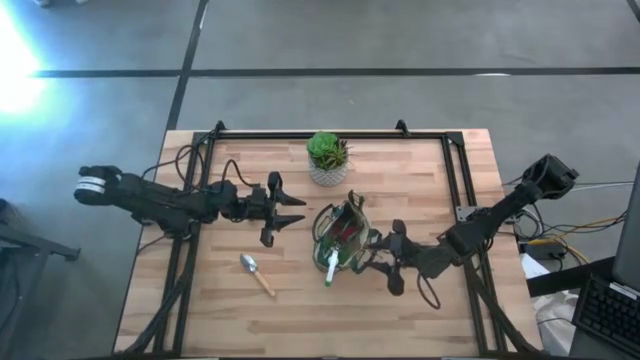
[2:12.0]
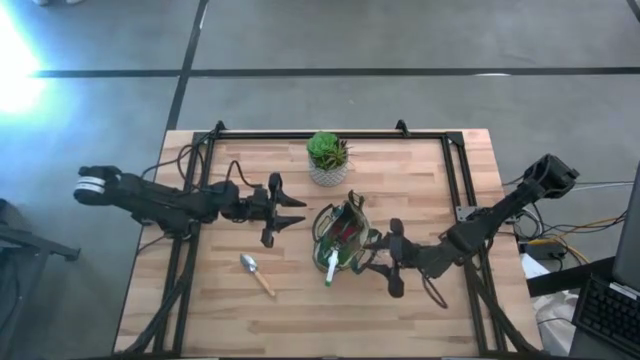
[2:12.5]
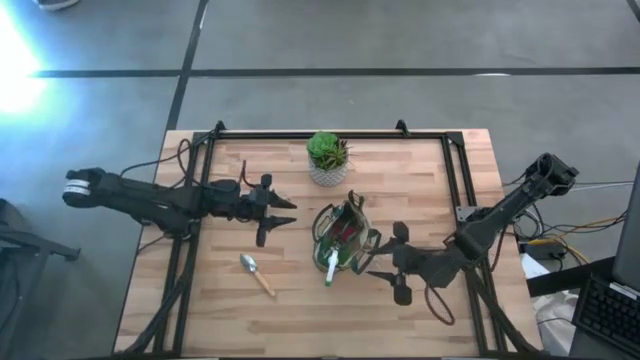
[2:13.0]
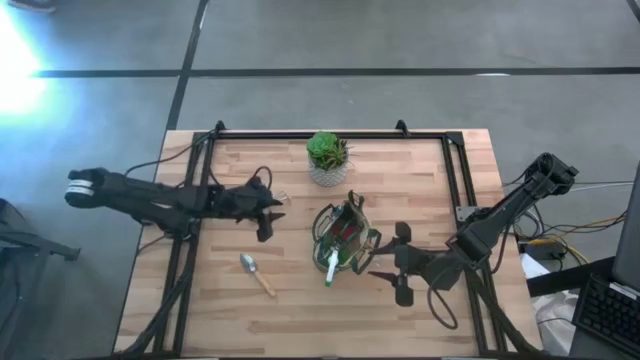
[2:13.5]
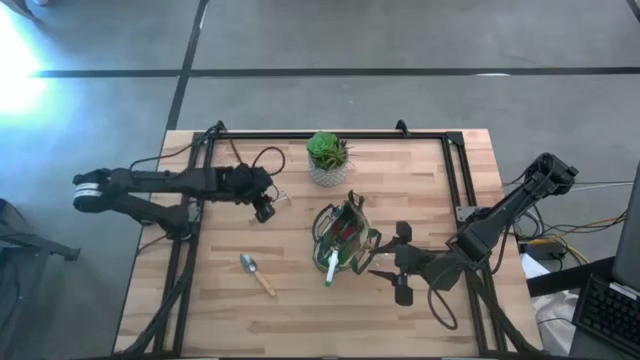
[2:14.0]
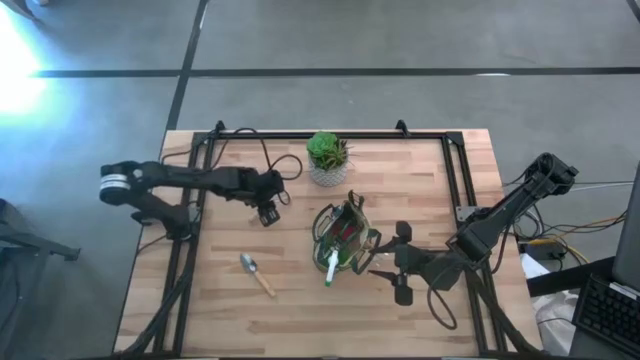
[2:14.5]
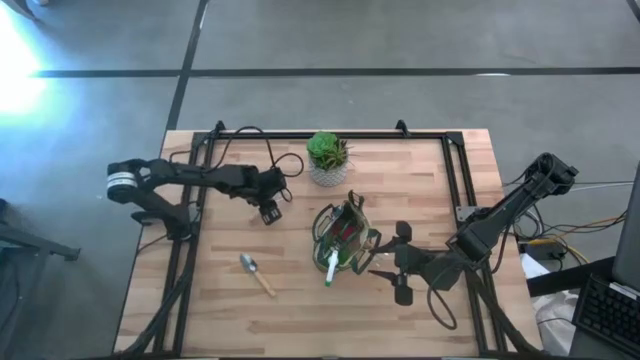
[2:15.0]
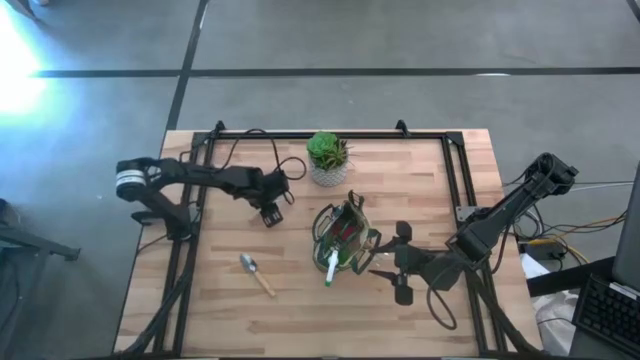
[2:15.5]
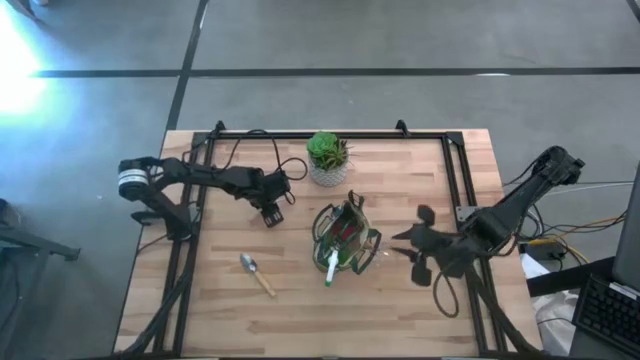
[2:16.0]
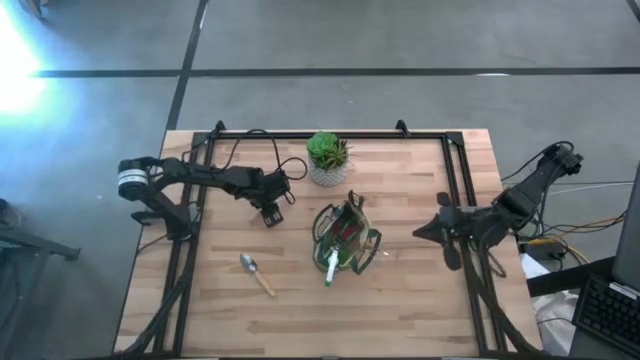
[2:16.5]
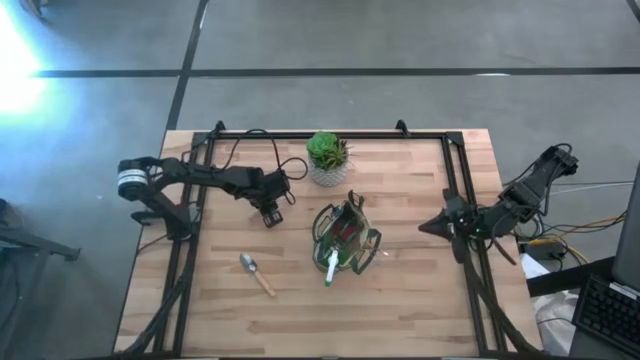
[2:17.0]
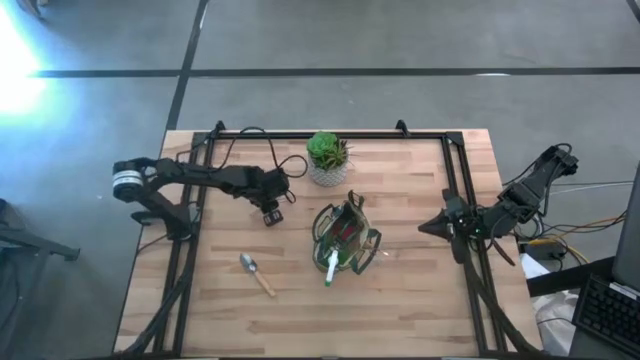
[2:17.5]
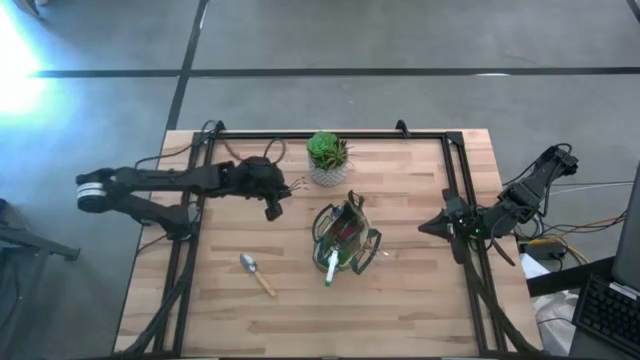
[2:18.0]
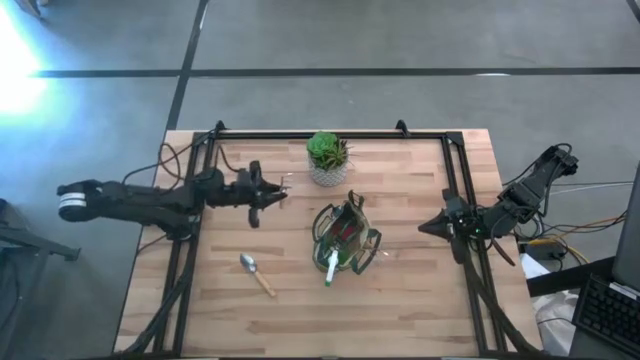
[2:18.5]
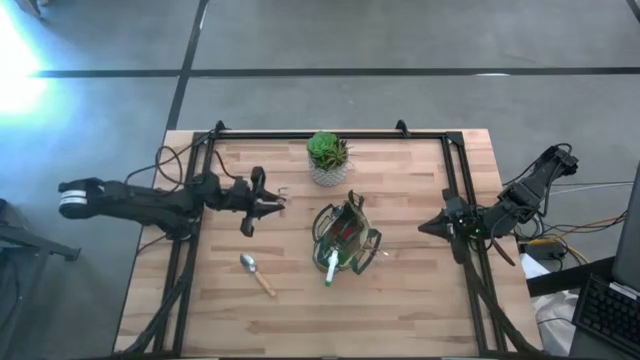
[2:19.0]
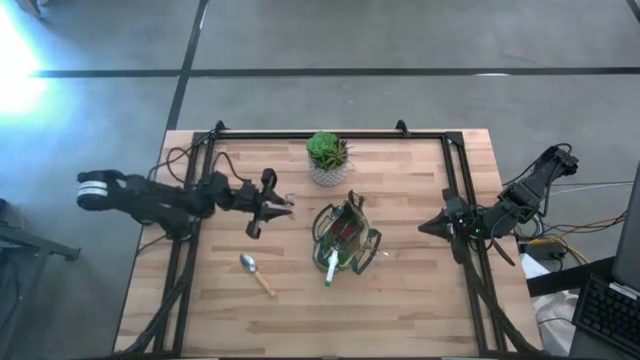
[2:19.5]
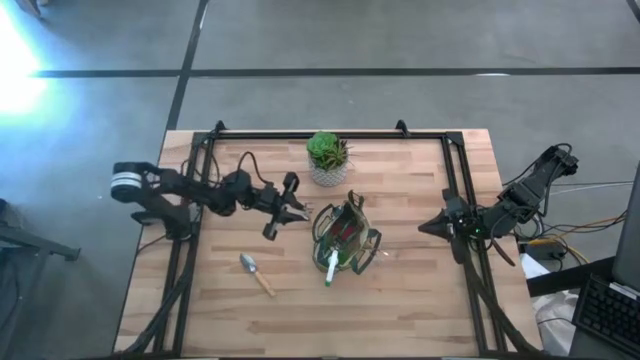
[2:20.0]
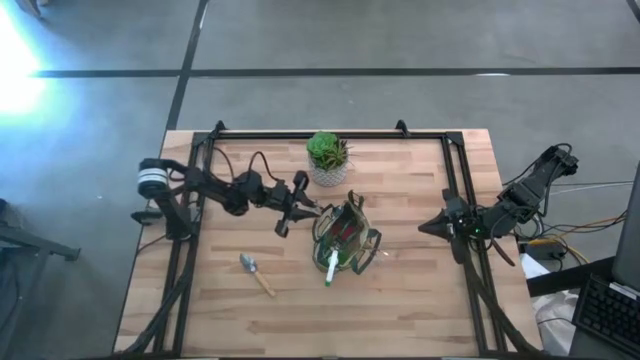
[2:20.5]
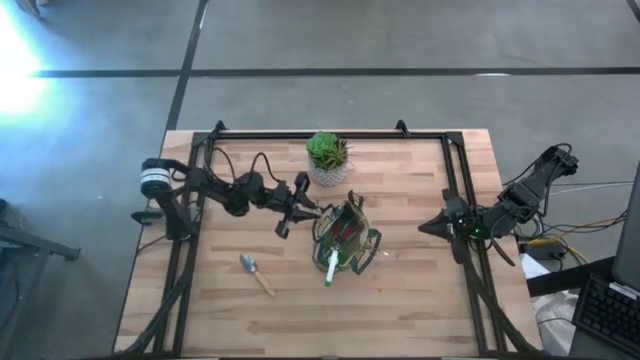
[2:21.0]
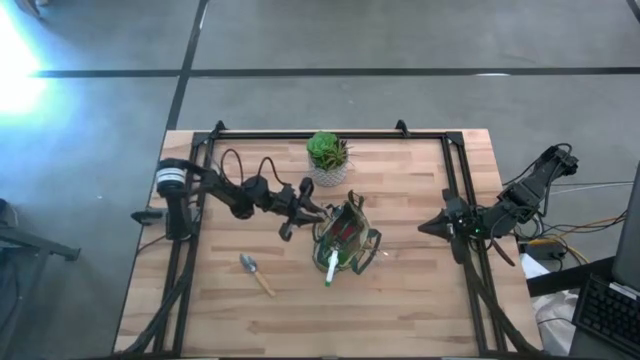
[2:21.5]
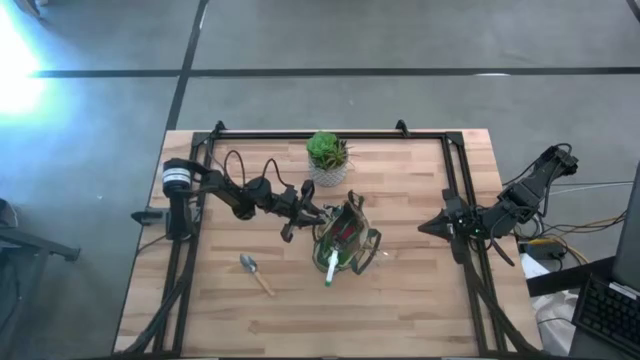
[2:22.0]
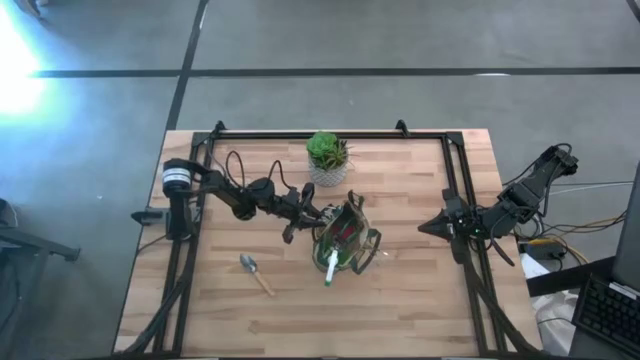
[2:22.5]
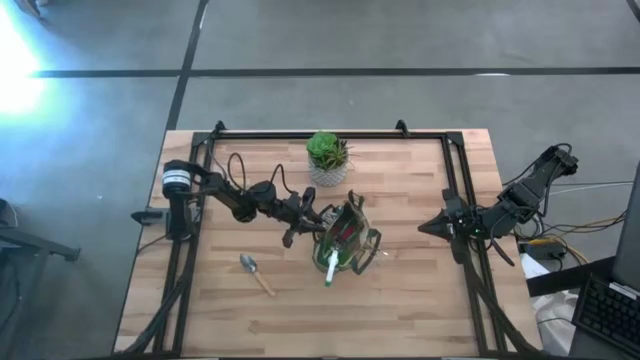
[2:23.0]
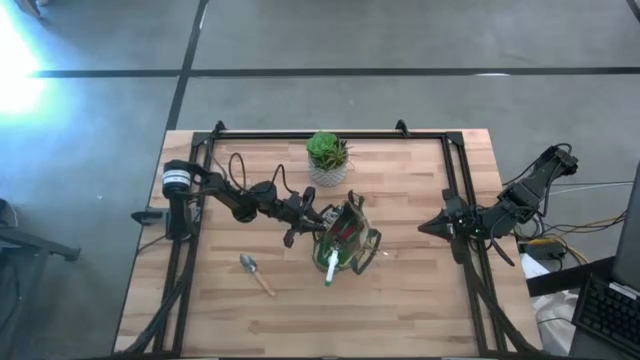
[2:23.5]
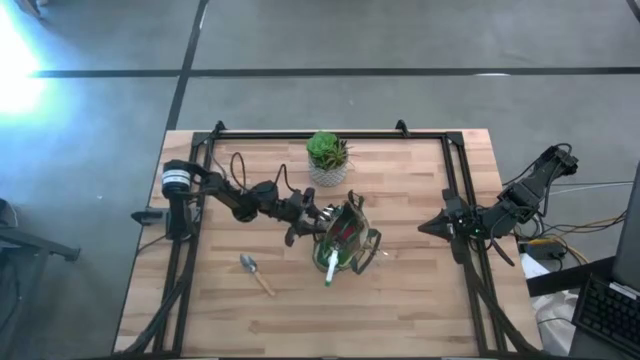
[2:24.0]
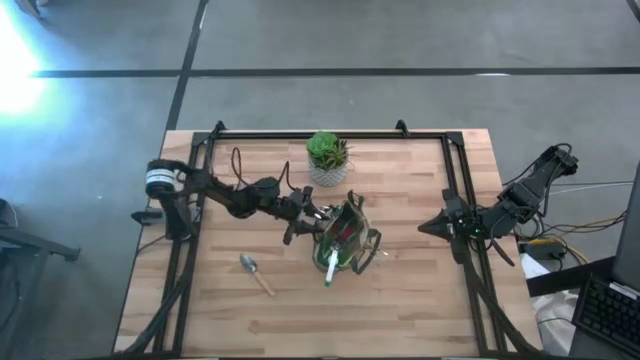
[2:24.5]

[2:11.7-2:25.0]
Task: Pick & Place Garden tools in Gardening bag
Put the brown hand rake into the side pocket of the gardening bag

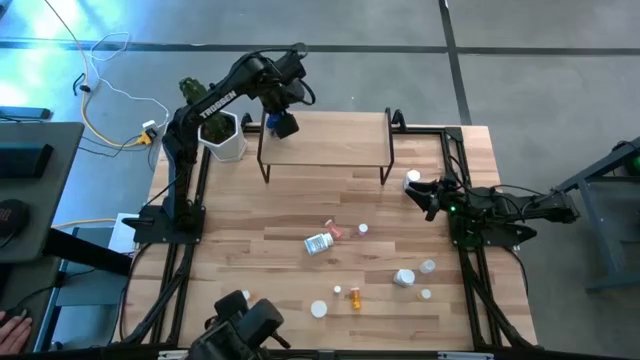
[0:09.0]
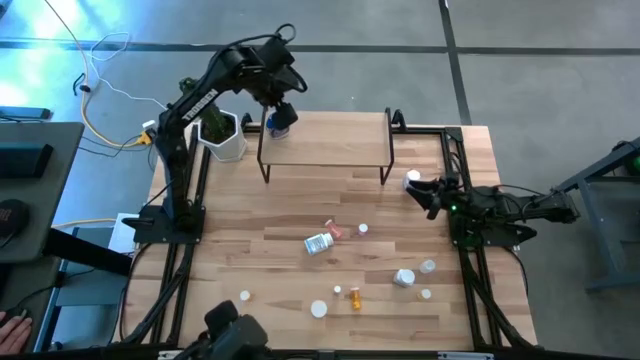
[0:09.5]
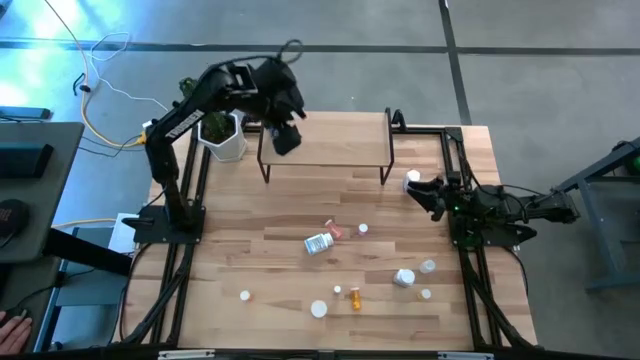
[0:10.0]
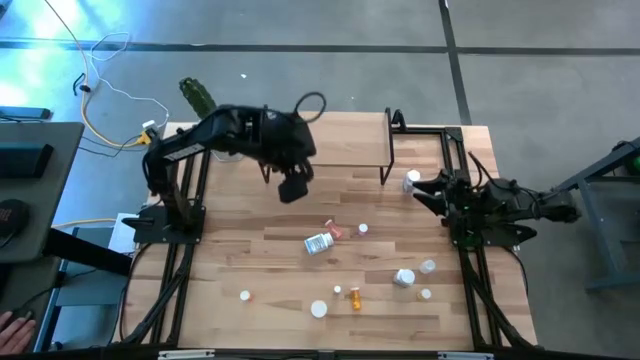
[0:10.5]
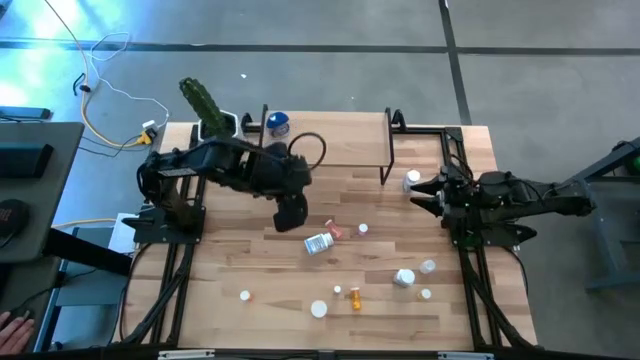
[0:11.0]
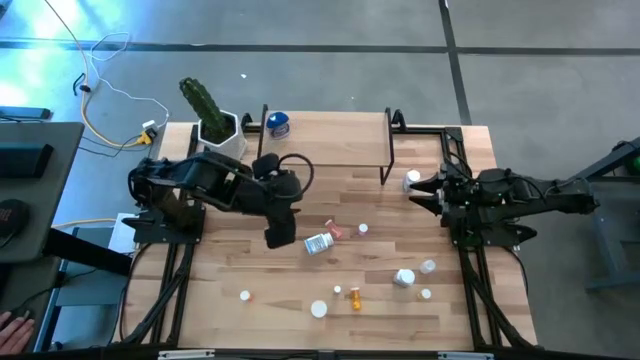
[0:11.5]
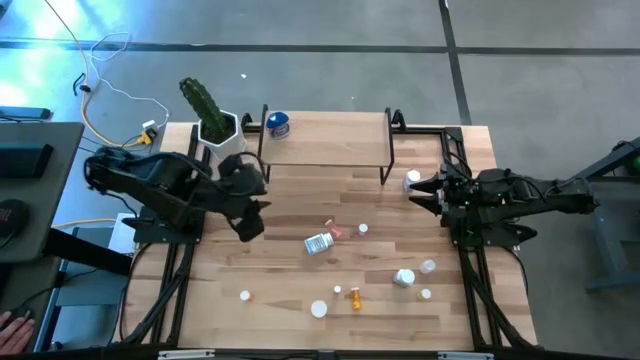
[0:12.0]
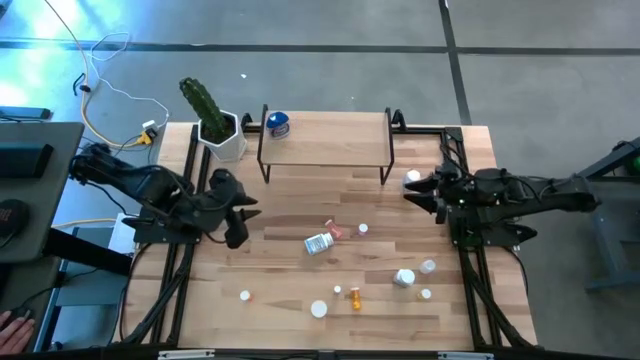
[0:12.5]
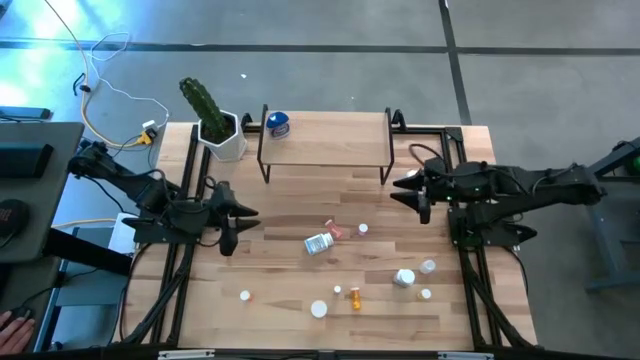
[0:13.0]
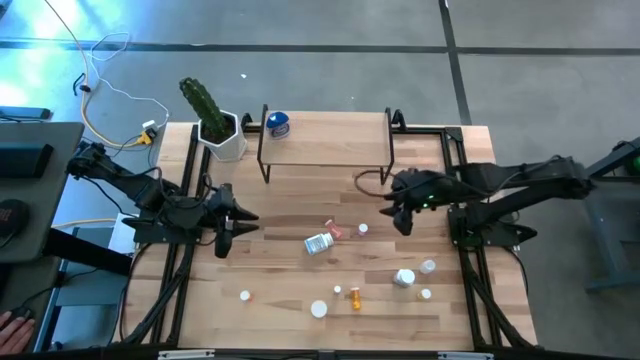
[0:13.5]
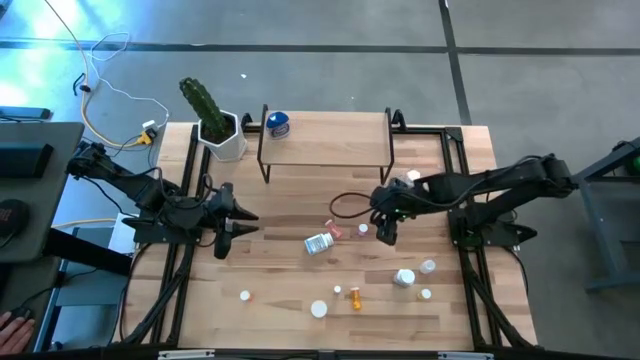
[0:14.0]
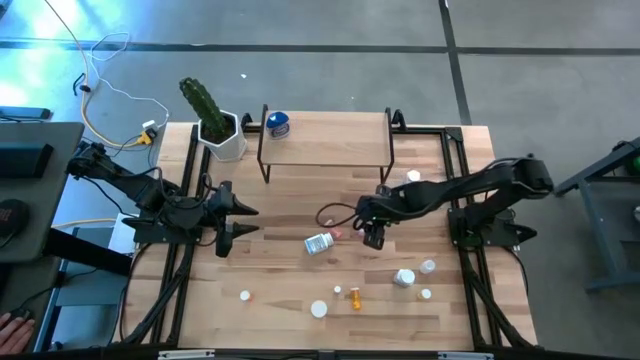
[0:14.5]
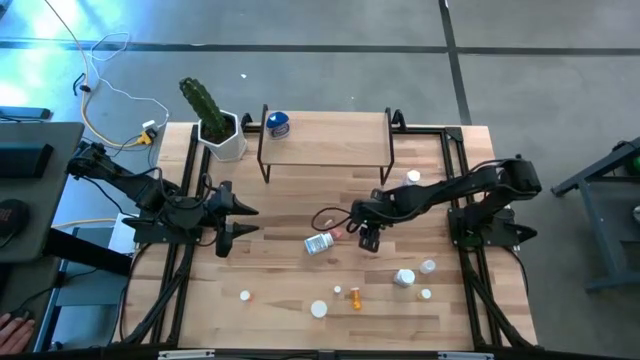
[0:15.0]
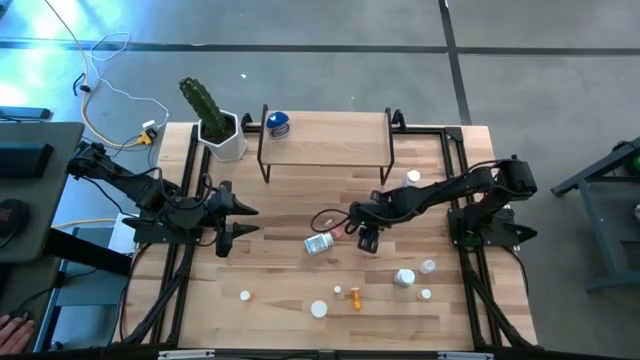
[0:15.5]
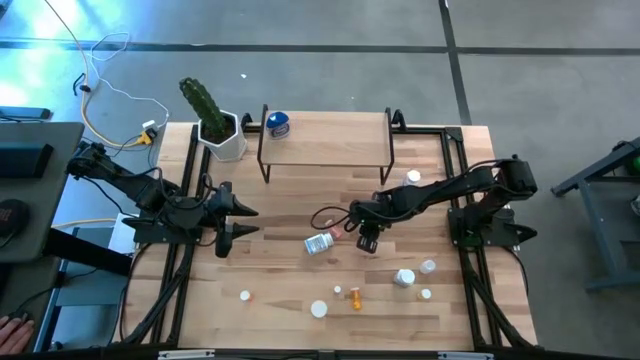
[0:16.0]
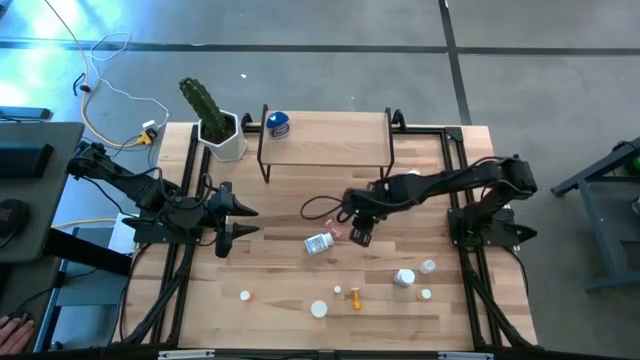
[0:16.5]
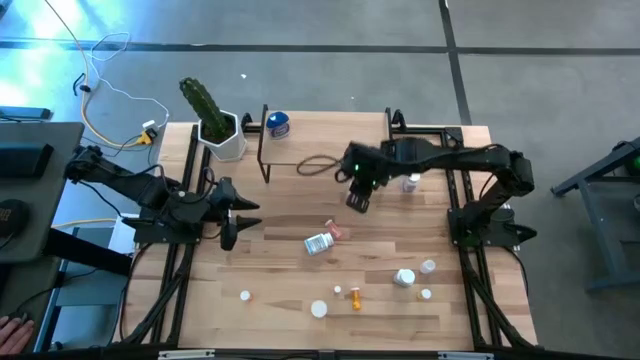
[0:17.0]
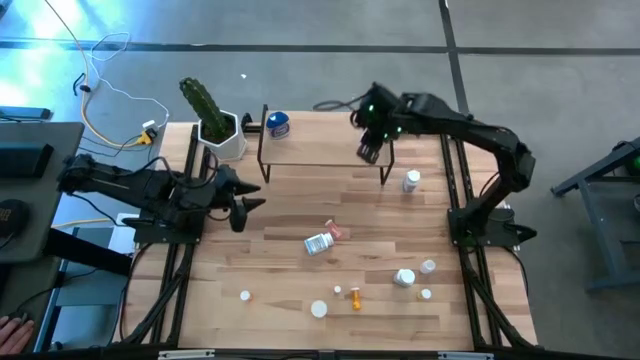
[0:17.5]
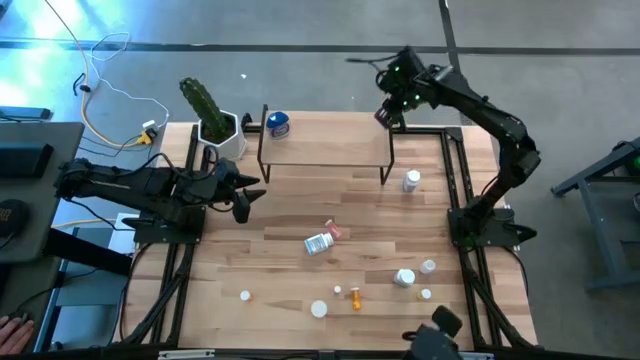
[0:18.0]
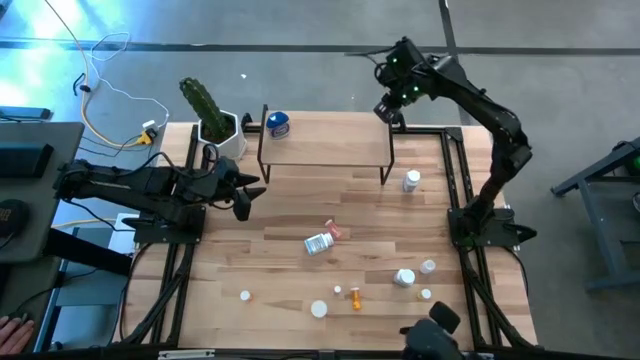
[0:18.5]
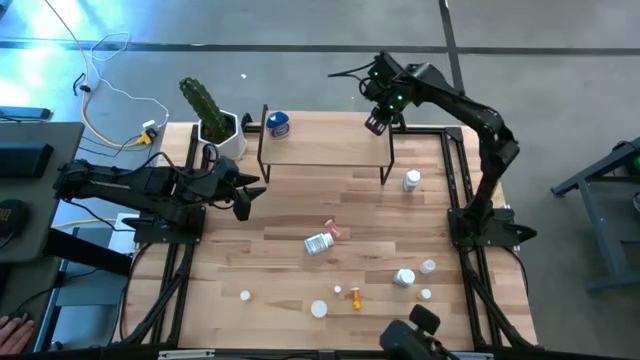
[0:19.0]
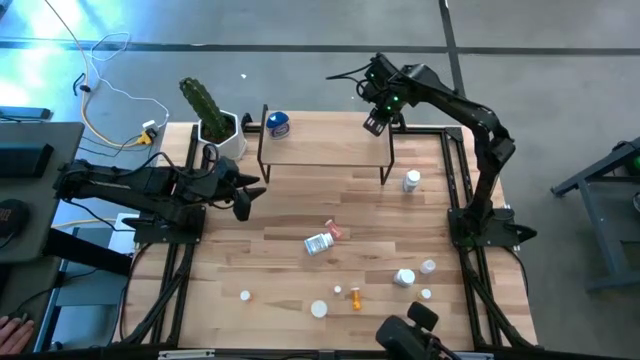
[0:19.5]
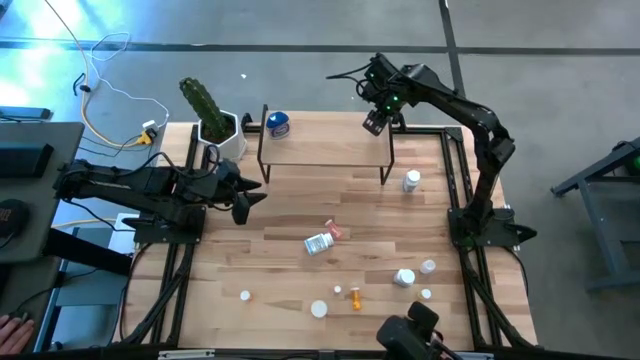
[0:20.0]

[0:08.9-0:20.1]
Task: Pick and place medicine bottles onto shelf by color
Put the right pink pill bottle on the shelf
